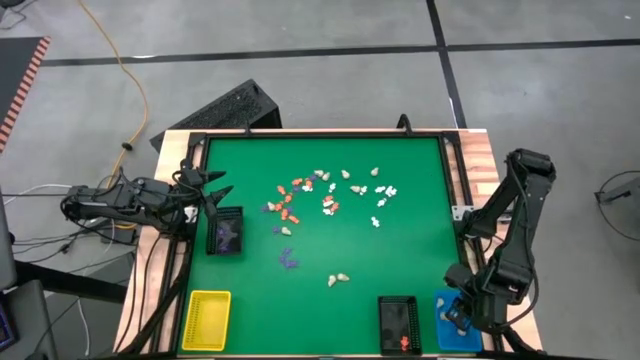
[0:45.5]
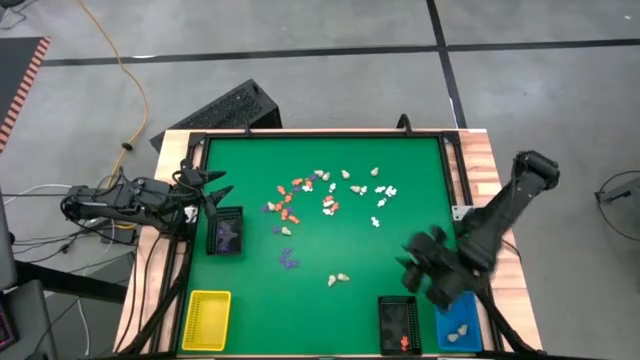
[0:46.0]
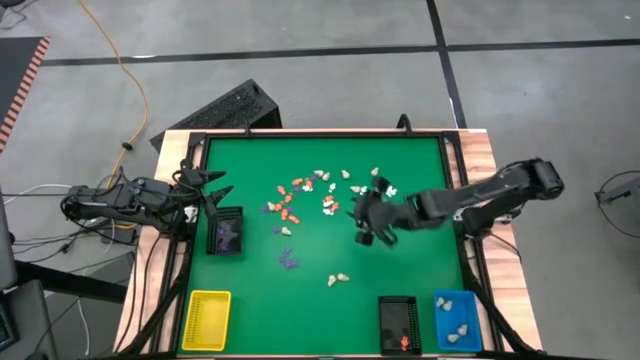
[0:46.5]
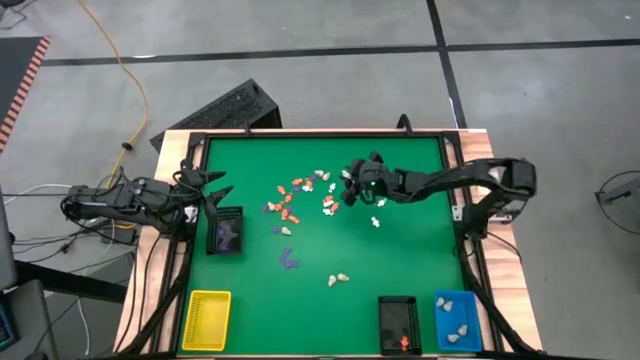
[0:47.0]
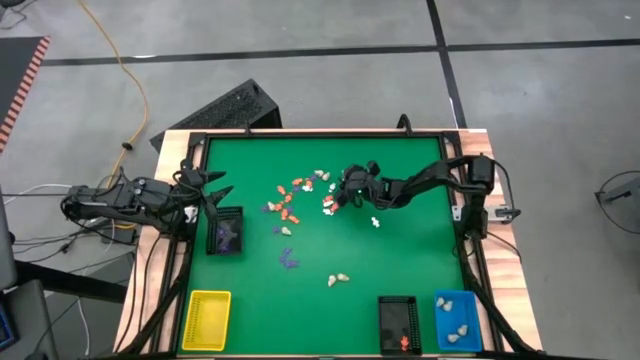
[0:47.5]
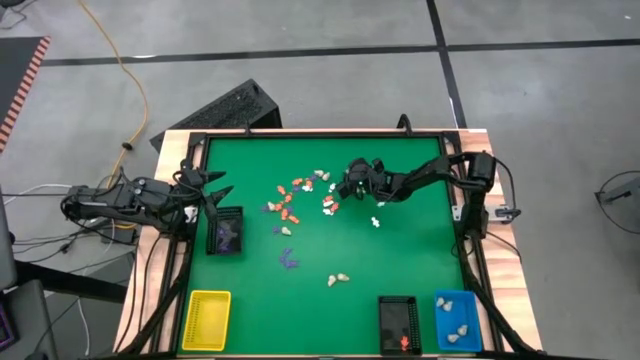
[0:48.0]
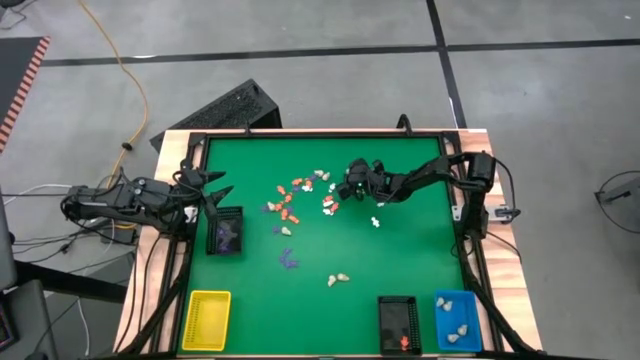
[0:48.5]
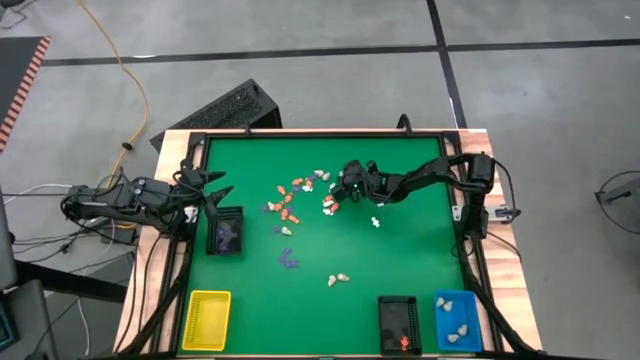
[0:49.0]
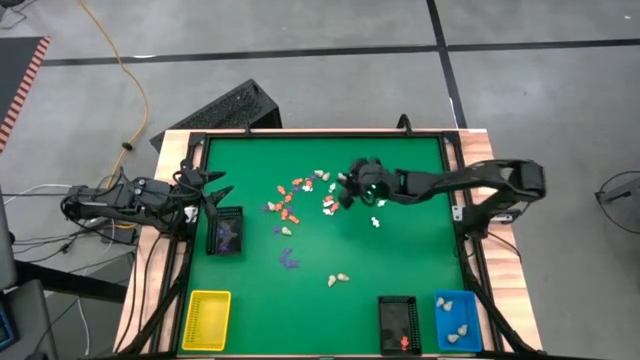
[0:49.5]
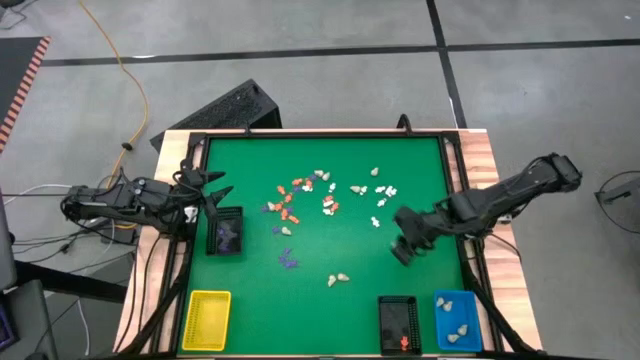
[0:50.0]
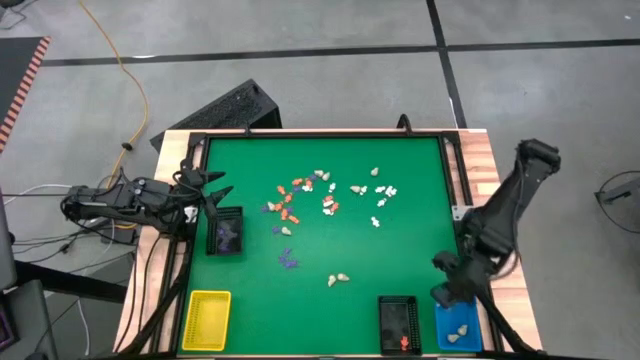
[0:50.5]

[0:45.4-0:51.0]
Task: Sort Halloween decoration
Put the white skull toy into the blue basket

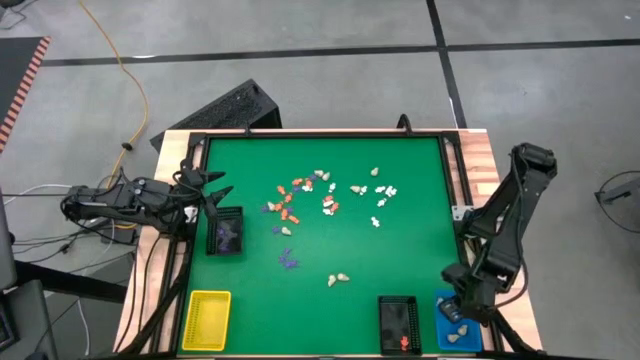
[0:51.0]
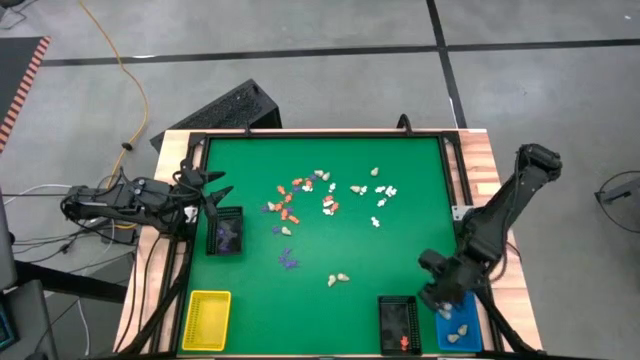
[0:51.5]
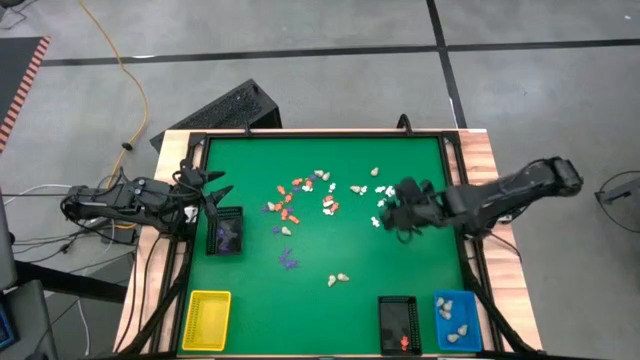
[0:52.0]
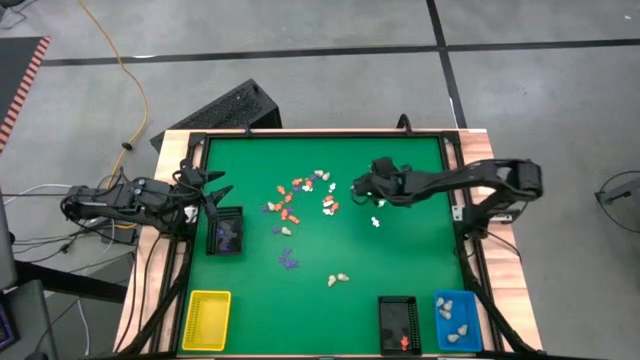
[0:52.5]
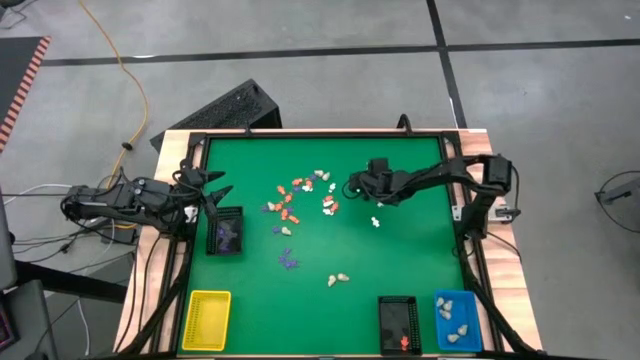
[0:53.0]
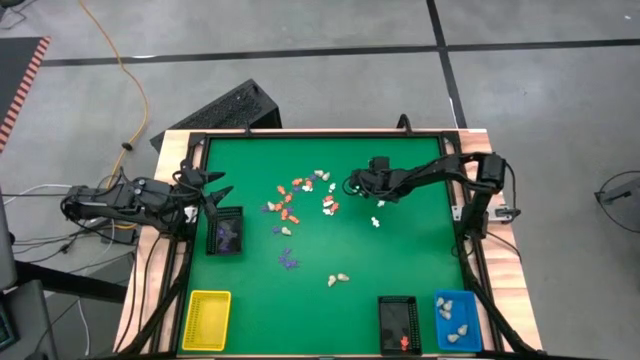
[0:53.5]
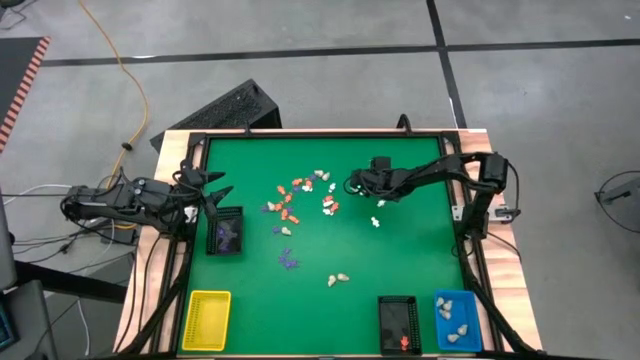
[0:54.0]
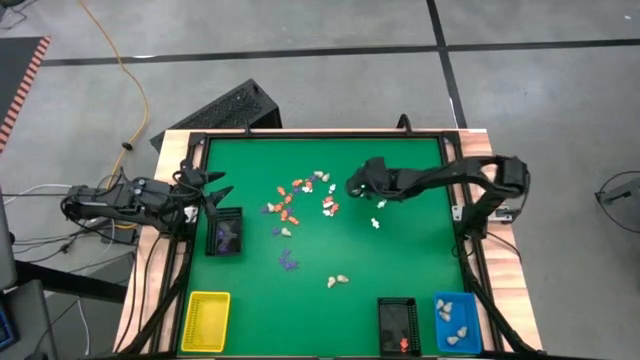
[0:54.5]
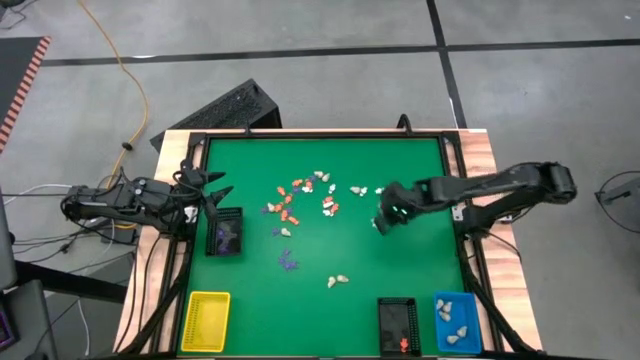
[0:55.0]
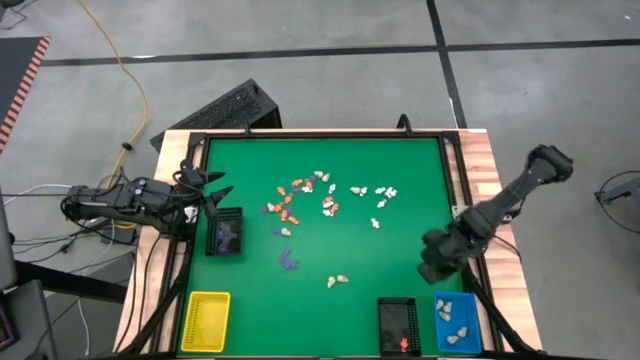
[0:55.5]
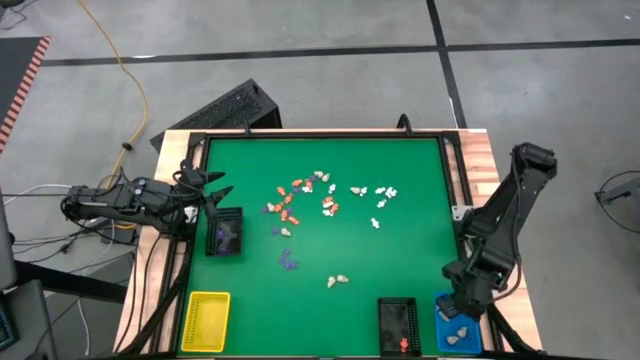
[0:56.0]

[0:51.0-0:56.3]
Put the white skull toy into the blue basket

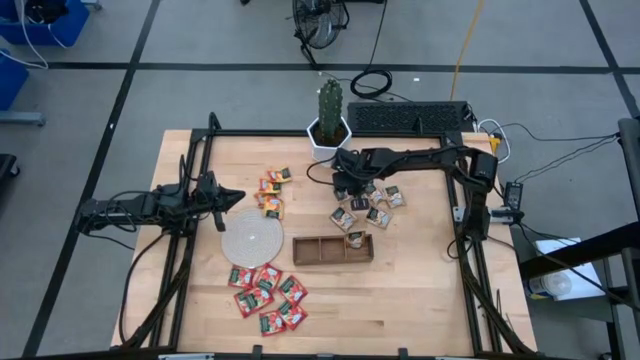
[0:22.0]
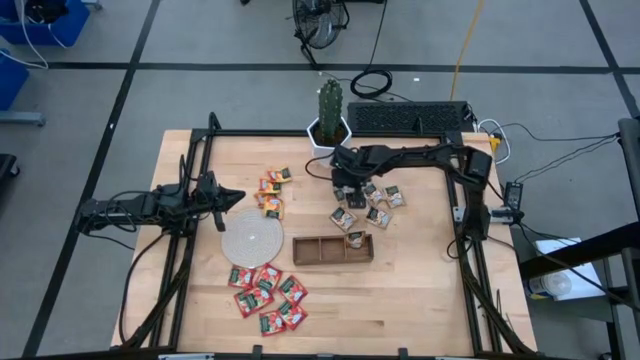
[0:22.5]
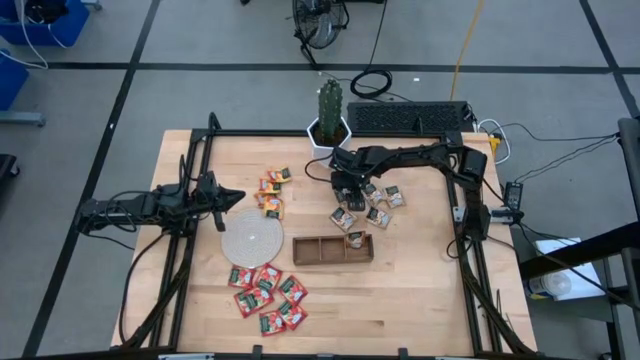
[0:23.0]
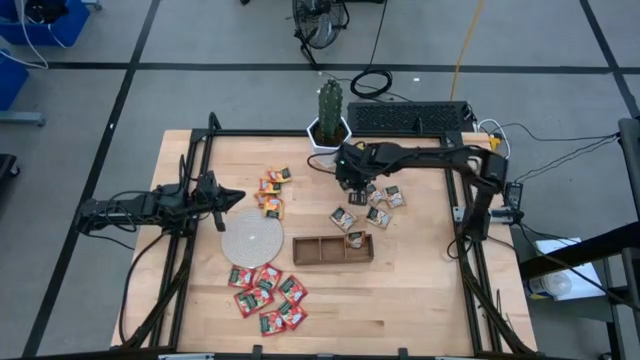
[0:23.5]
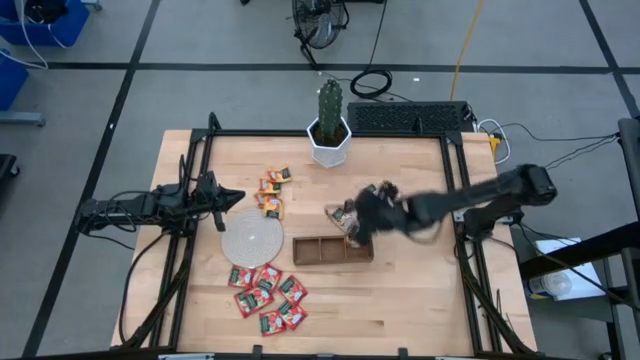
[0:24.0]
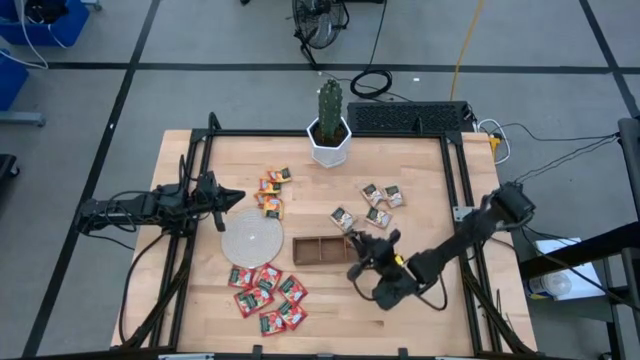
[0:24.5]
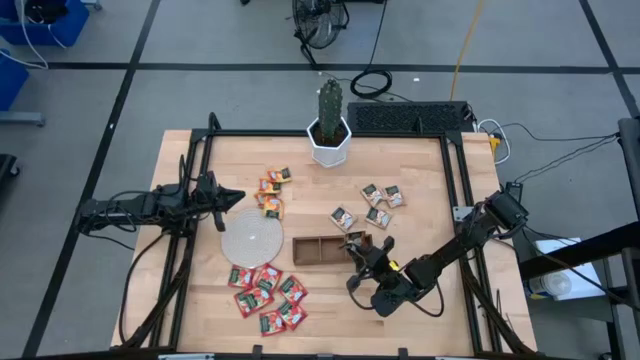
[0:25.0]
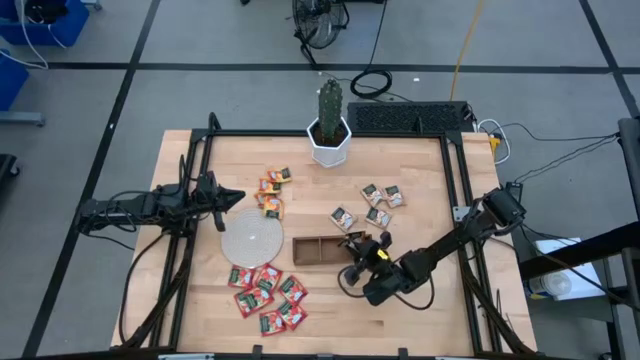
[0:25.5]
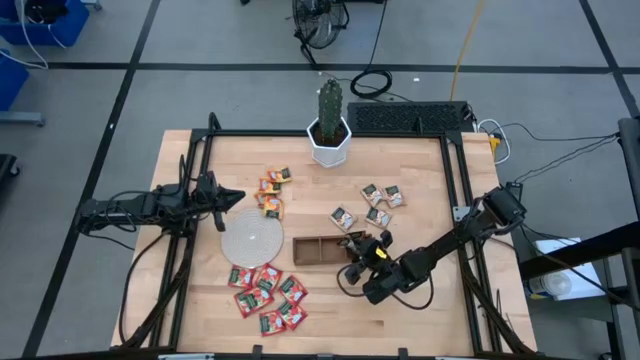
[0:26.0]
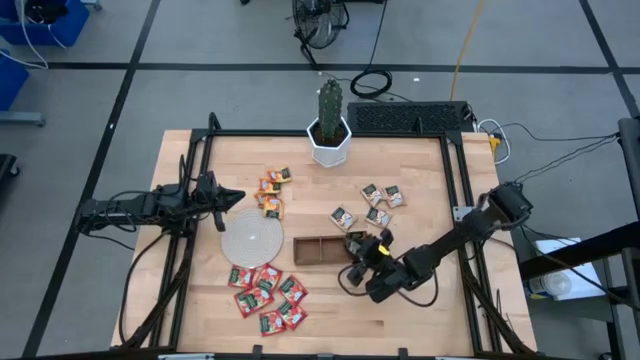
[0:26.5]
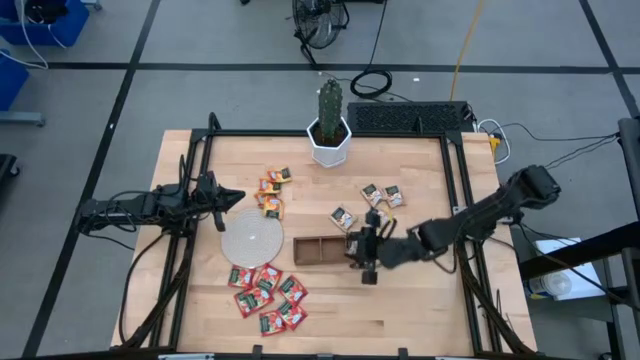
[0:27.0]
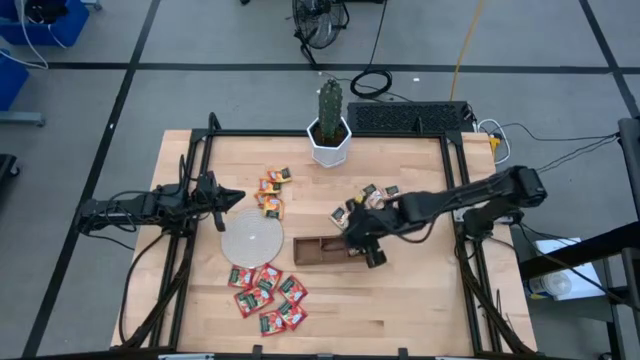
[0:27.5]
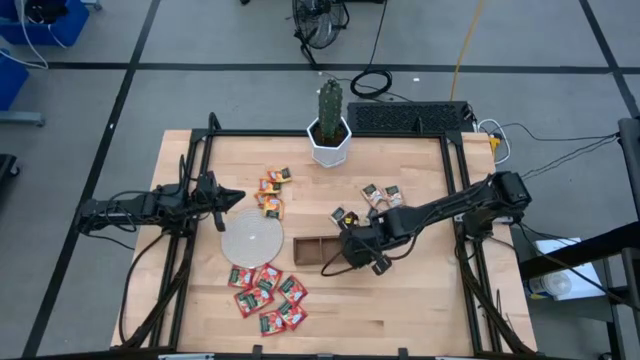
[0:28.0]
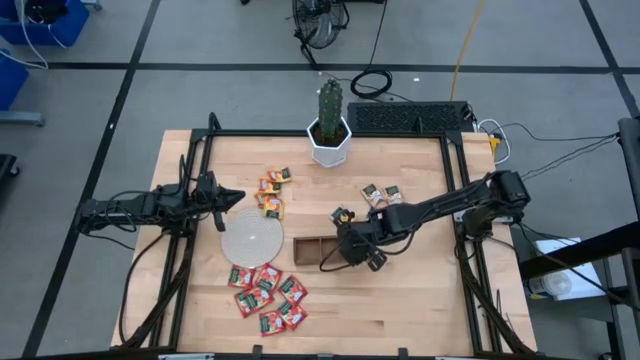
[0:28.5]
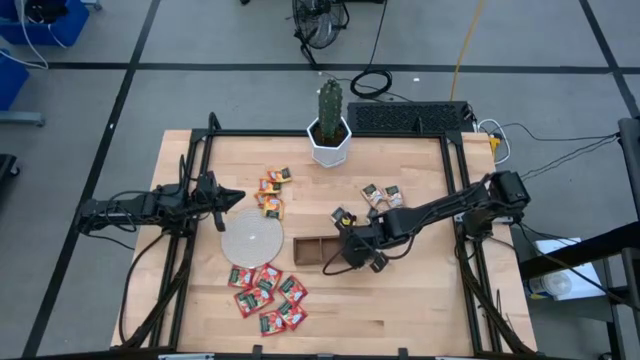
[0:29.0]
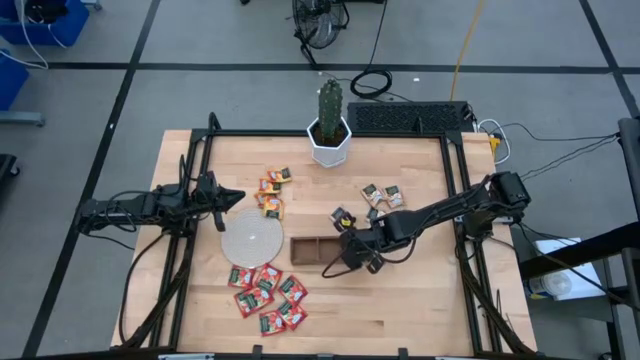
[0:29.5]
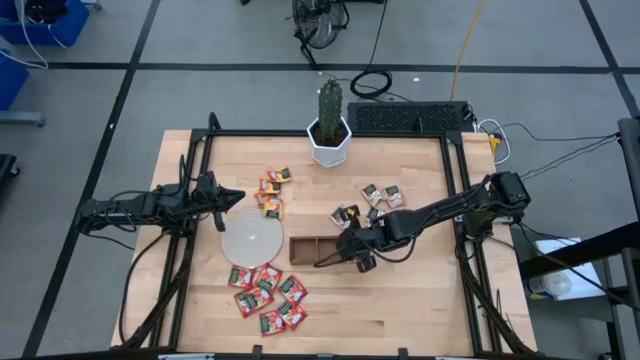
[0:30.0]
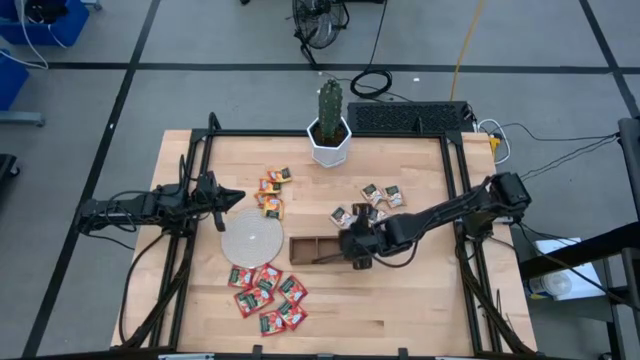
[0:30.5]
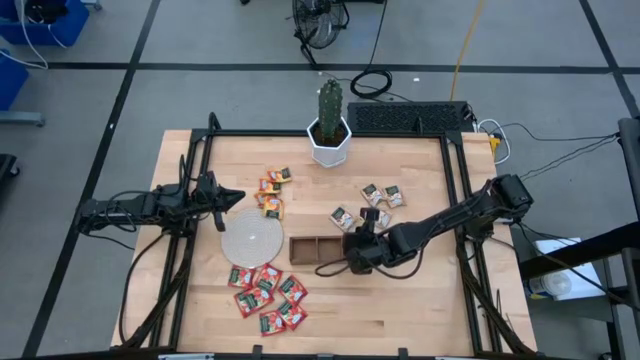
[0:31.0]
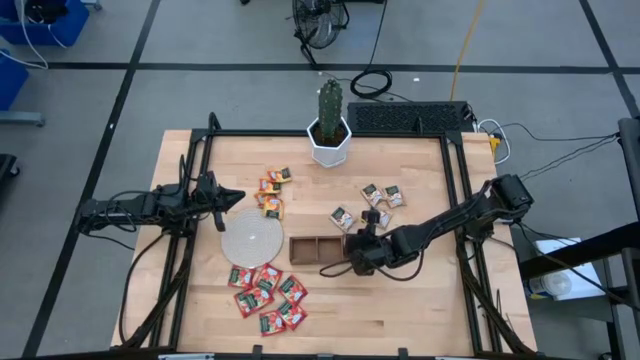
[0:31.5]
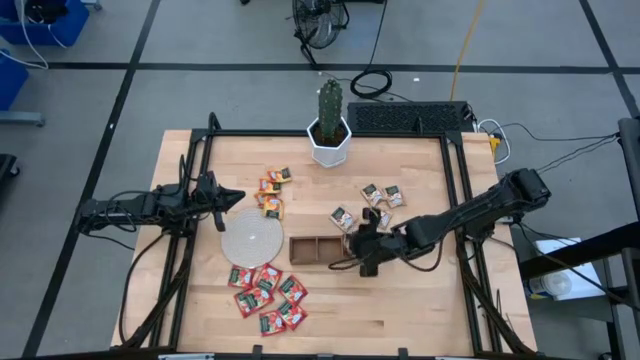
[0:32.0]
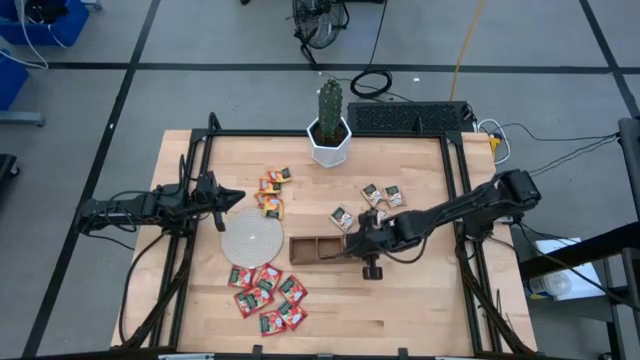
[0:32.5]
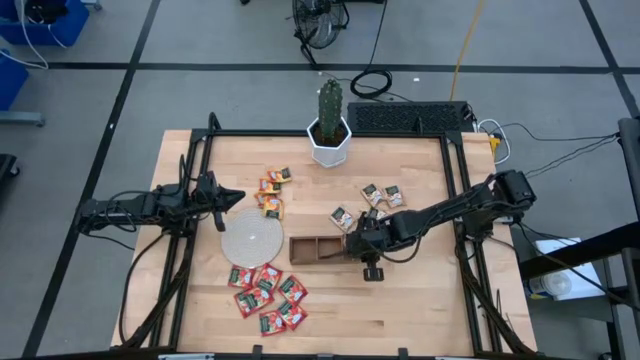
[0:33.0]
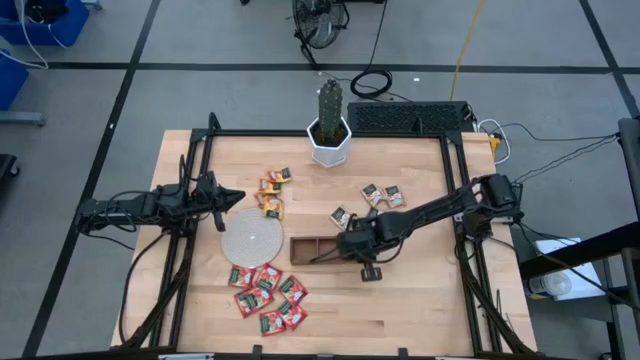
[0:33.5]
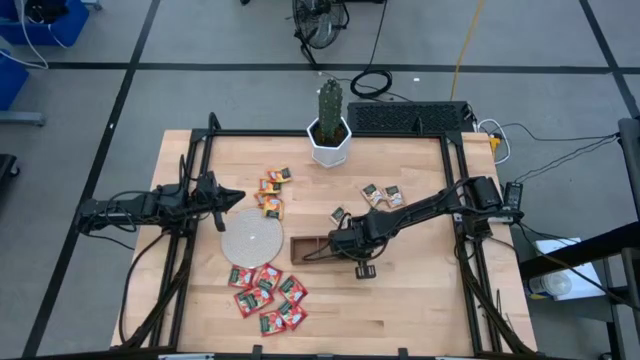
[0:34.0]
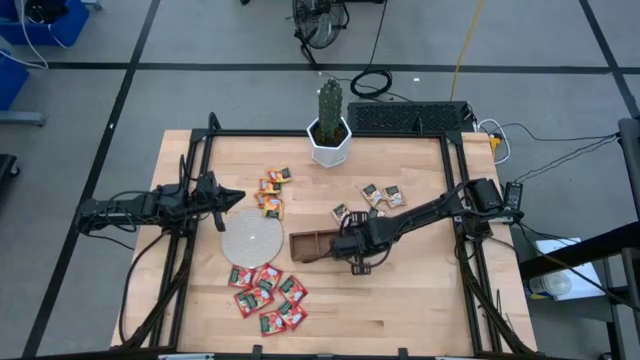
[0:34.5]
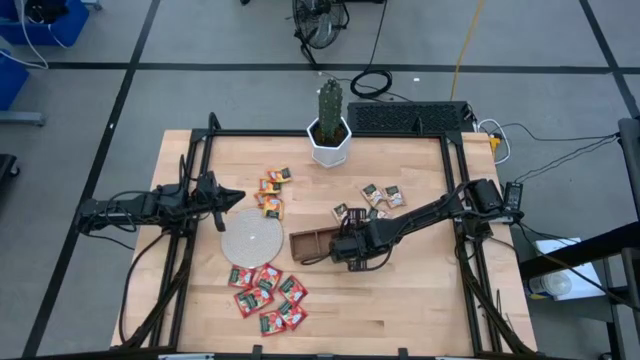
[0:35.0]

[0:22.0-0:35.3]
Task: Pick & Place Tea
Put the brown tea bag into the right section of the wooden organizer
